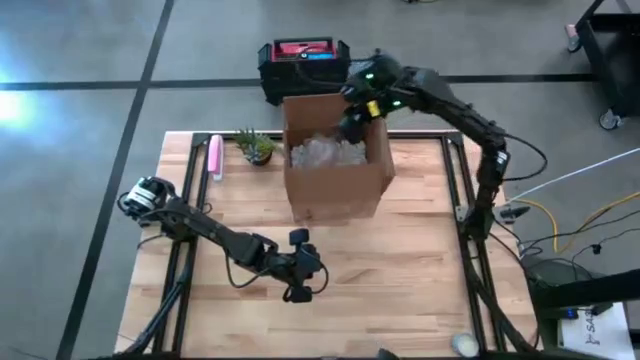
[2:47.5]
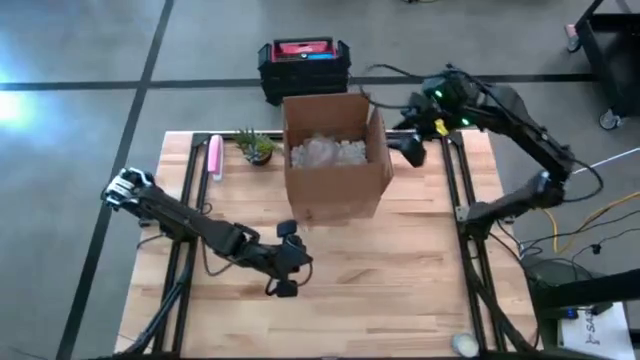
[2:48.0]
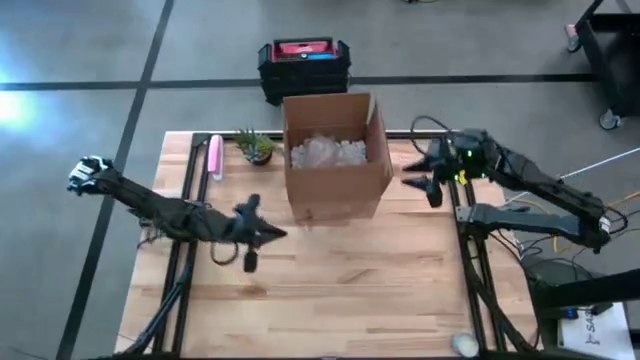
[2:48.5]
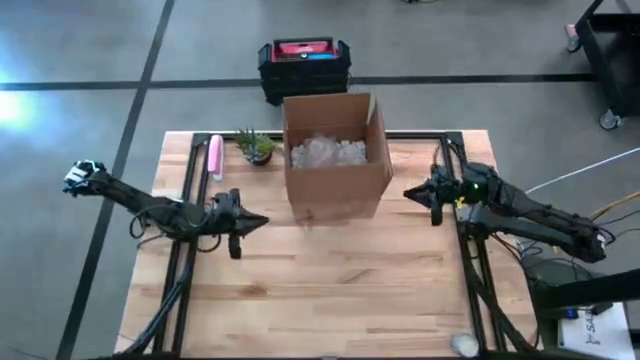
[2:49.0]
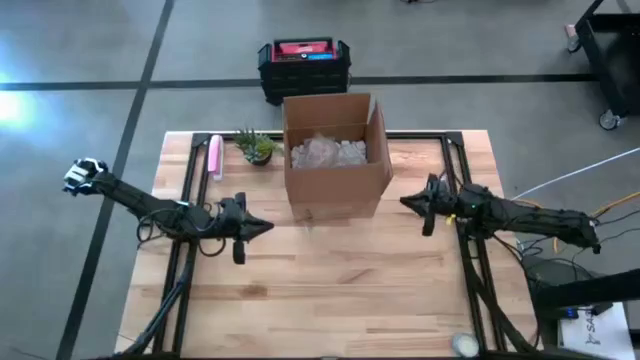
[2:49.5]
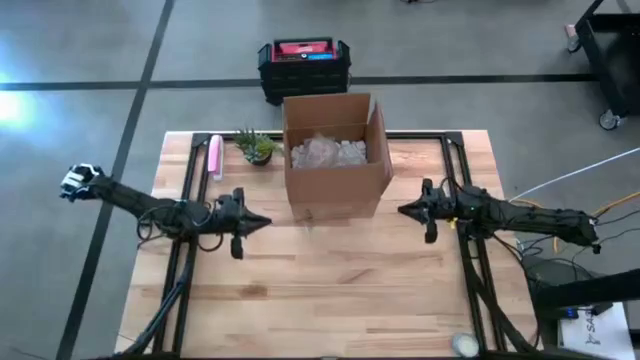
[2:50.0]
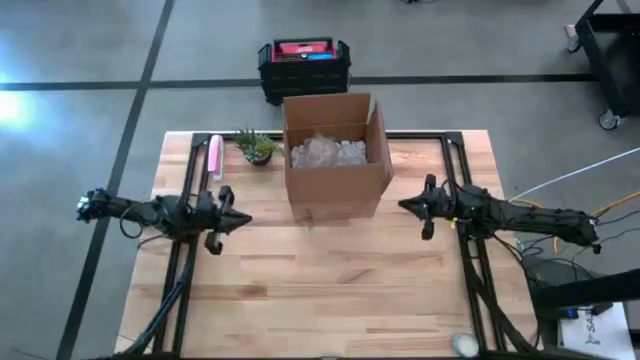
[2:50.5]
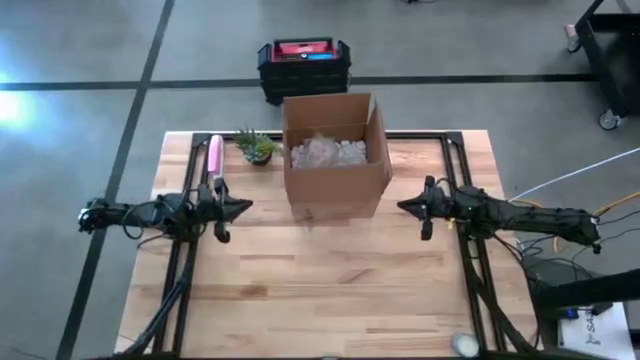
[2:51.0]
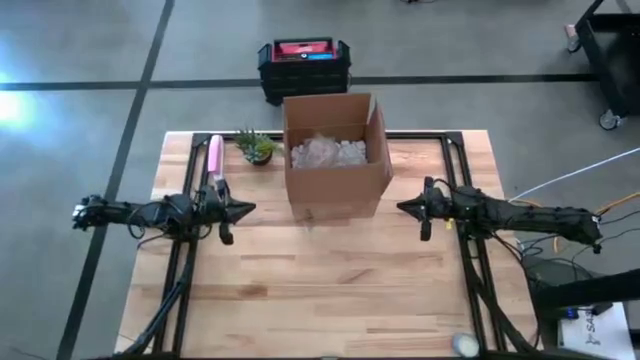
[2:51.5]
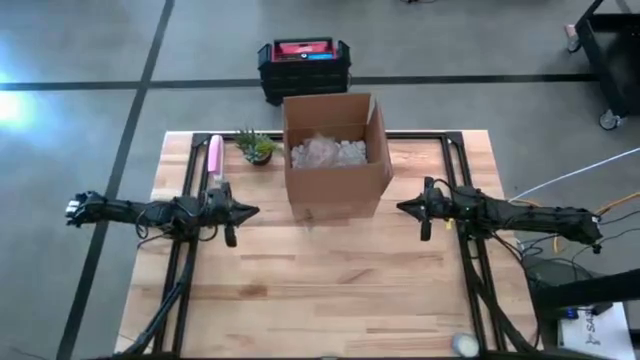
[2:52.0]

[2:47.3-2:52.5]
Task: wrap mug
Return to Home Position

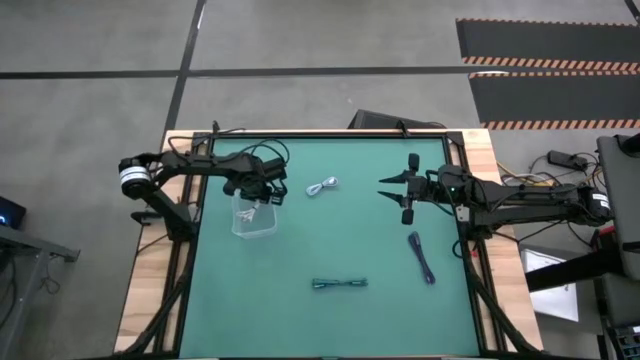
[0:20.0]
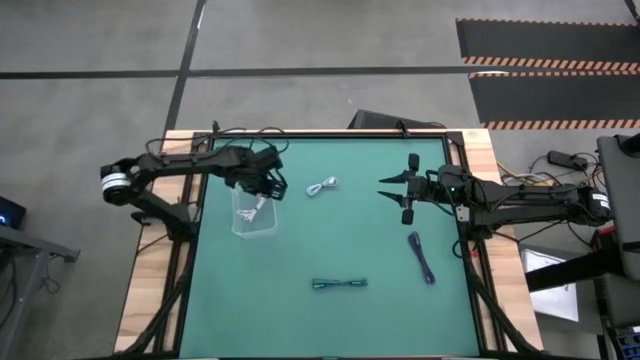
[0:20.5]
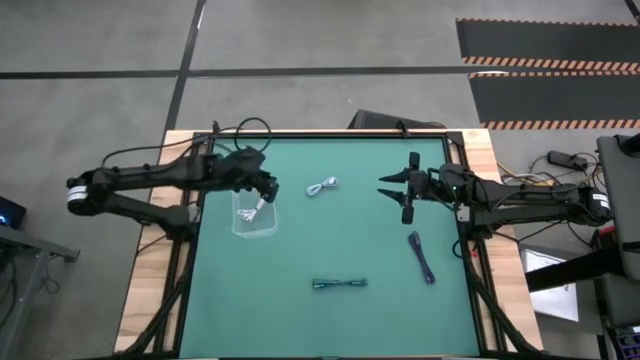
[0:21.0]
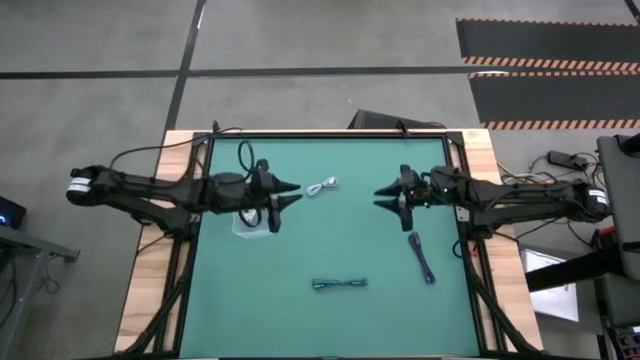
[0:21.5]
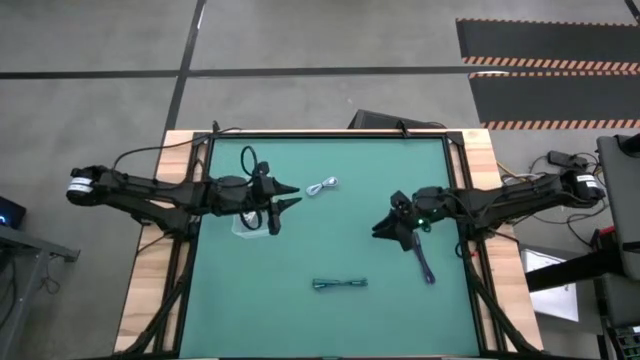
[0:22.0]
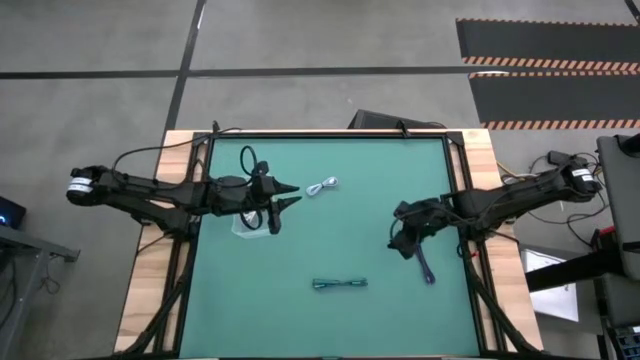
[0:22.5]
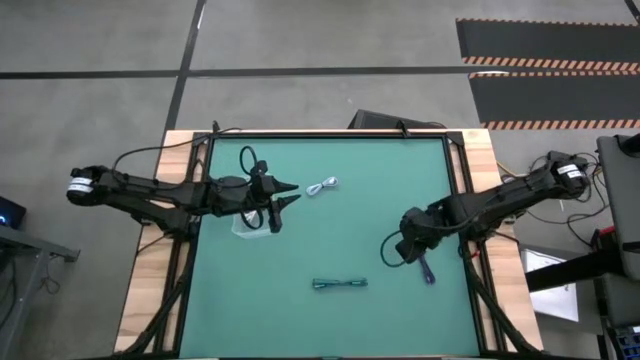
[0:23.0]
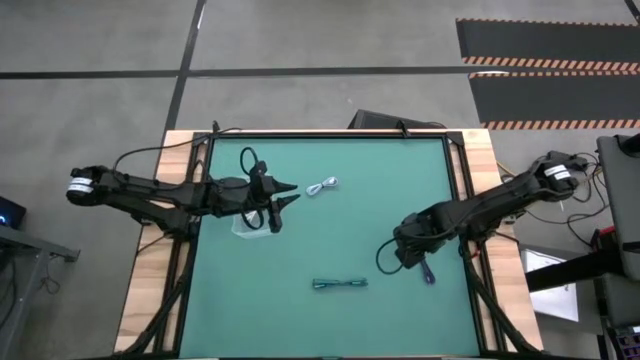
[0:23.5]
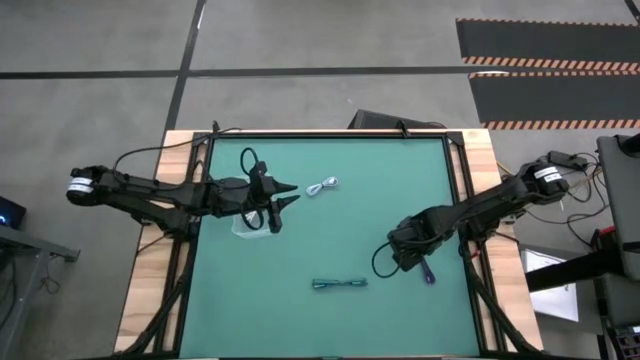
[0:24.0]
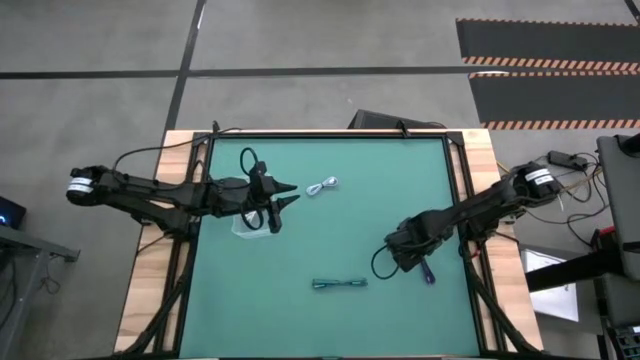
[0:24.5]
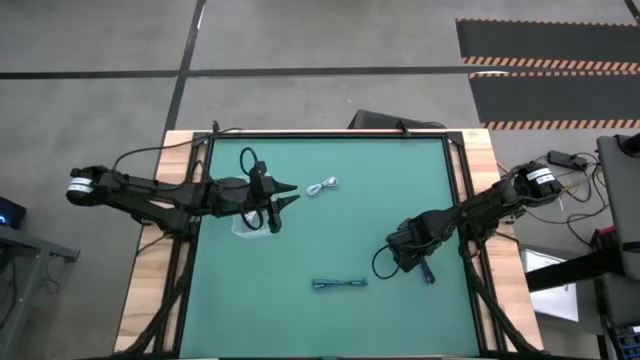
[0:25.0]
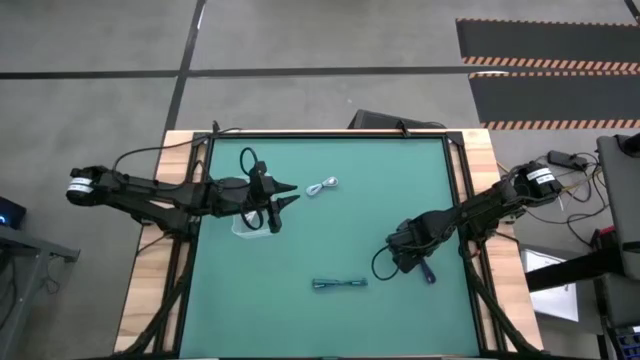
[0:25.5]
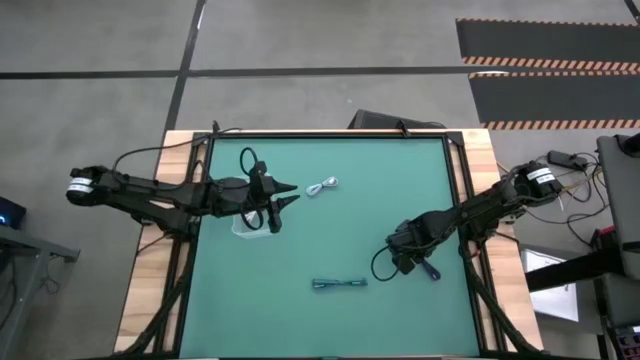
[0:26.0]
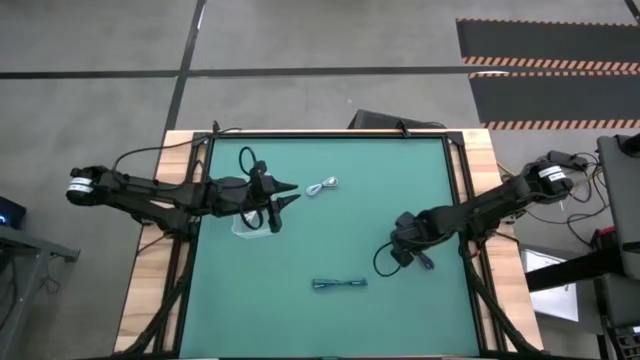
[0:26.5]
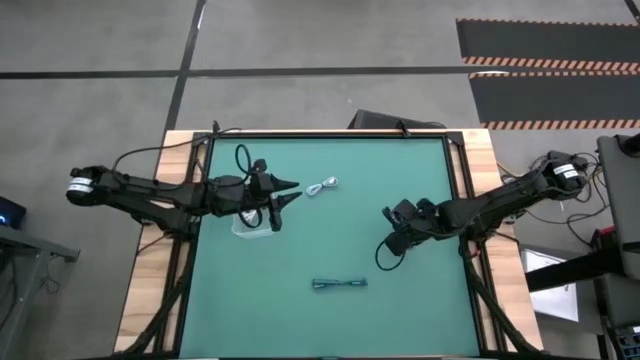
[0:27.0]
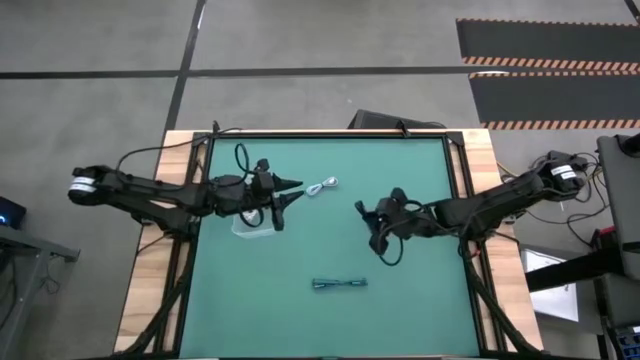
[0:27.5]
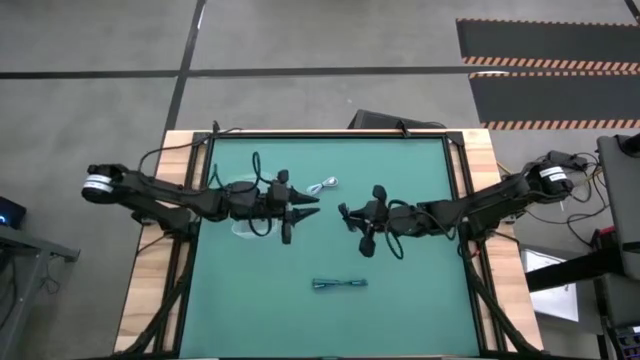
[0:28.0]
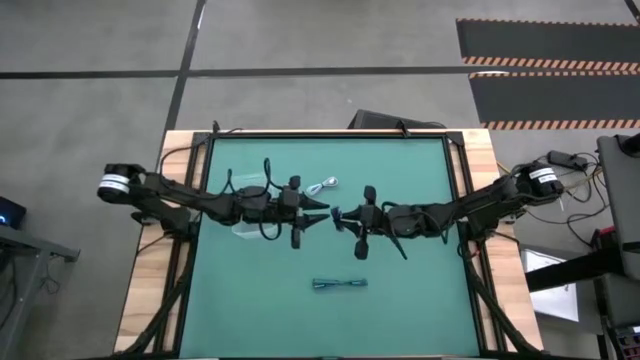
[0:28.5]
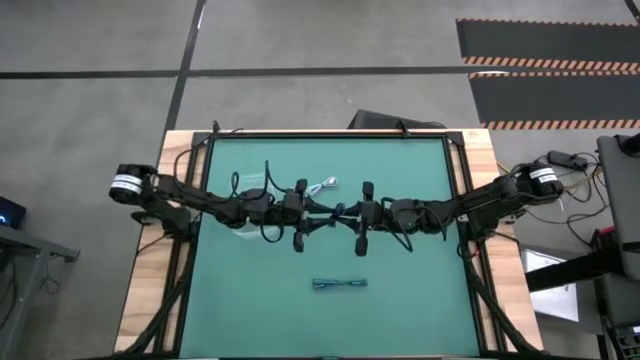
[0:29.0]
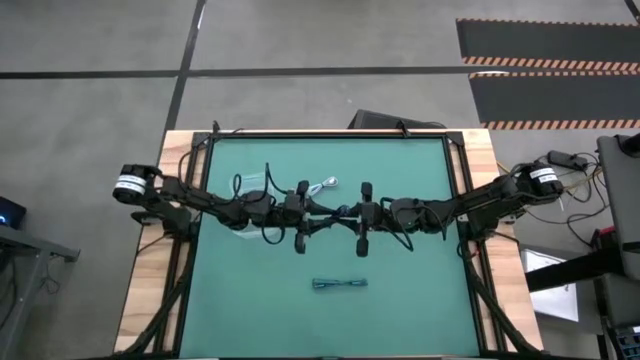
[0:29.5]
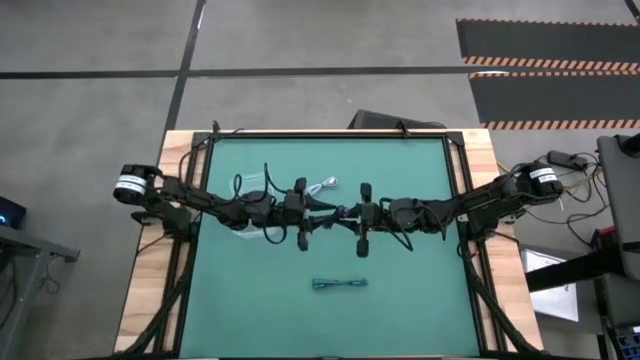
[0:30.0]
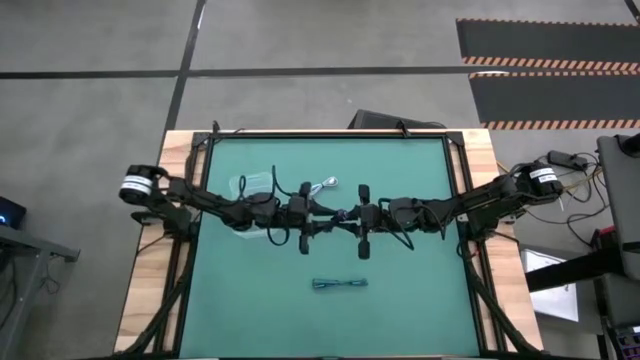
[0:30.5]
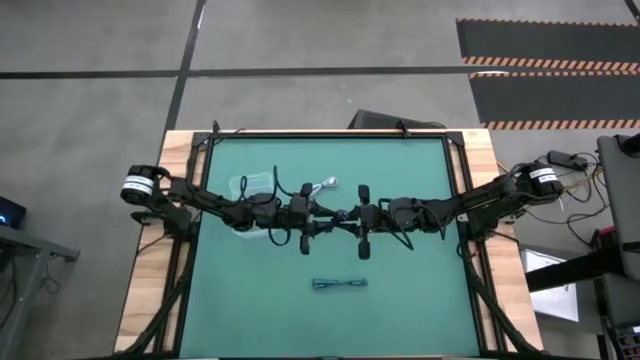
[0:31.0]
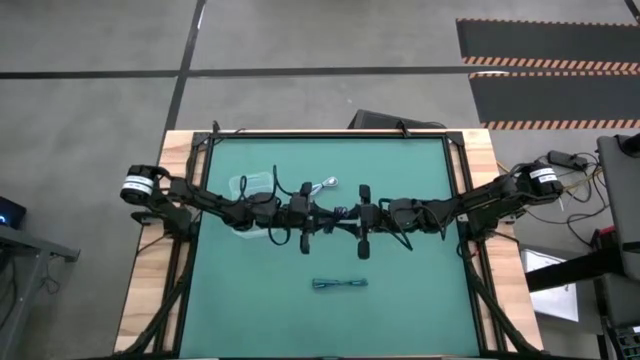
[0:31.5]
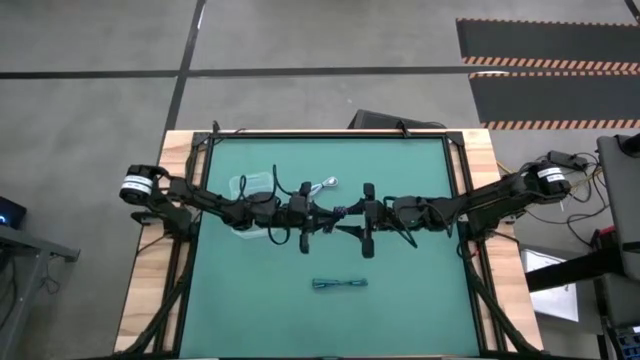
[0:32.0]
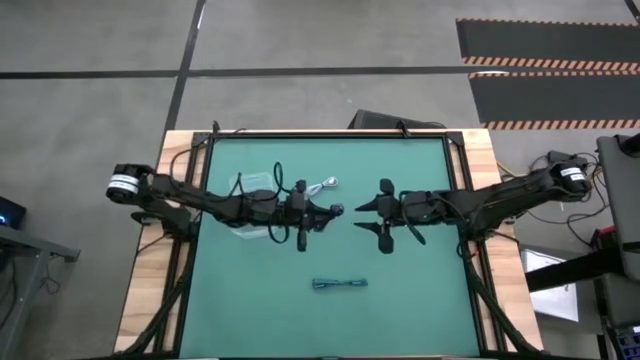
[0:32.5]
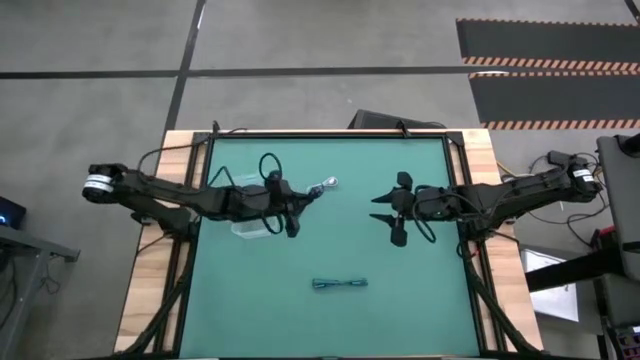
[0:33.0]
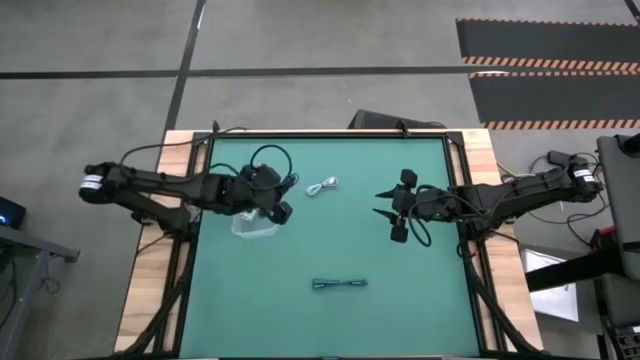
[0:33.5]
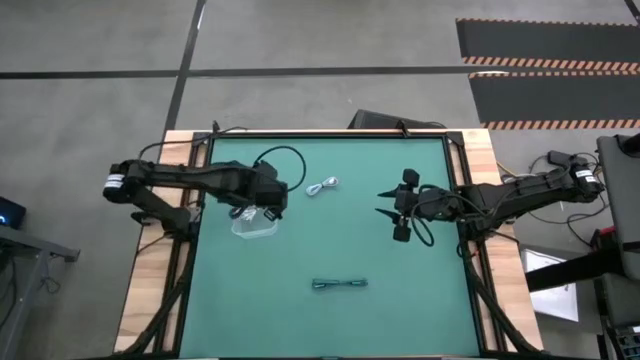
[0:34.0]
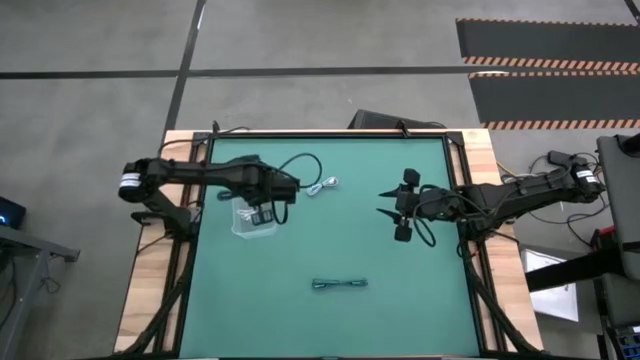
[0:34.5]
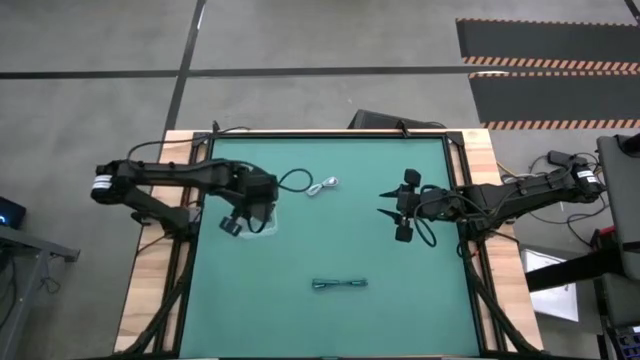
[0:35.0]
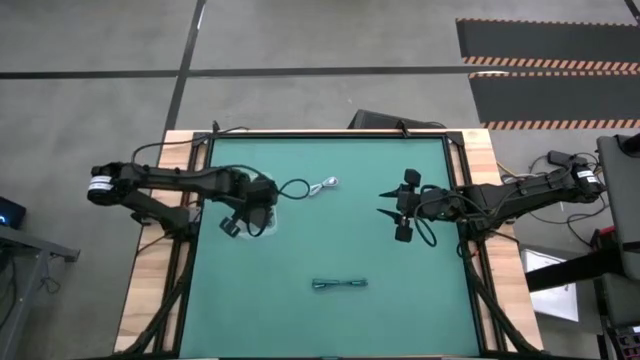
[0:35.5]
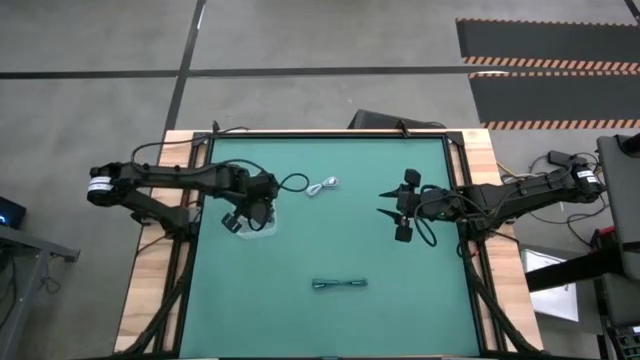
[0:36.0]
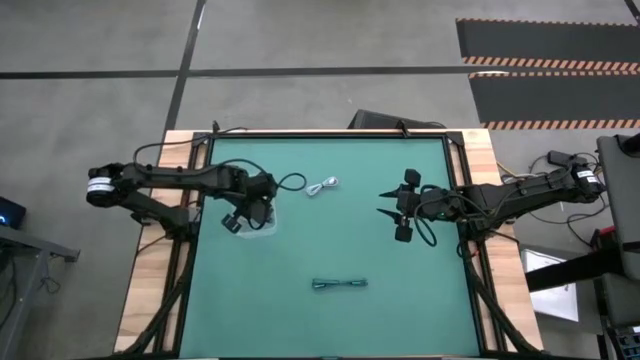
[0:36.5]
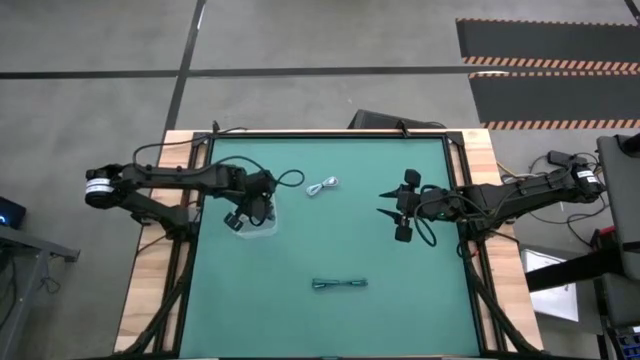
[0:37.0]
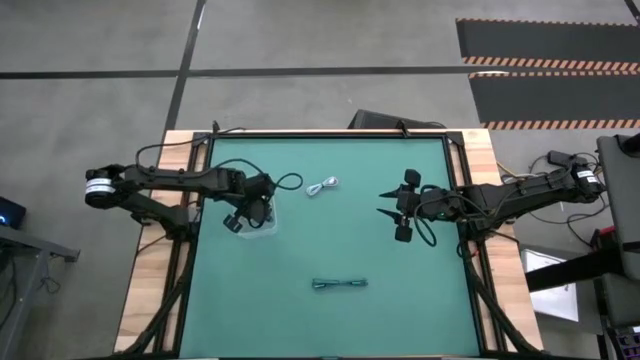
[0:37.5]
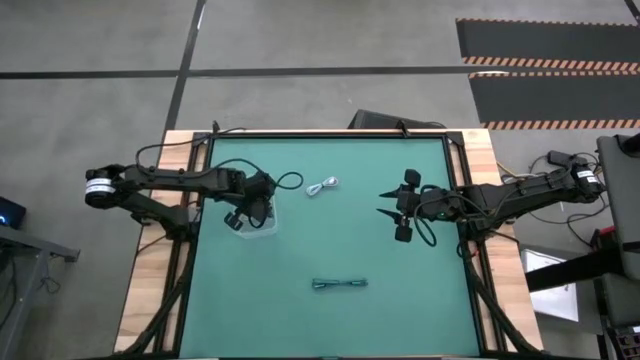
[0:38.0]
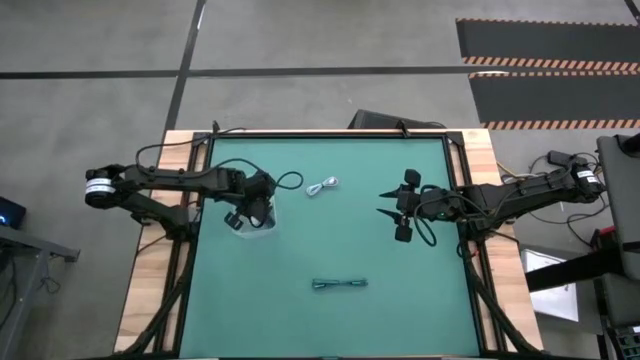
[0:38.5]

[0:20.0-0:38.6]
Task: Pick and place USB-C Cables
Put the violet charger cable into the transparent bin
